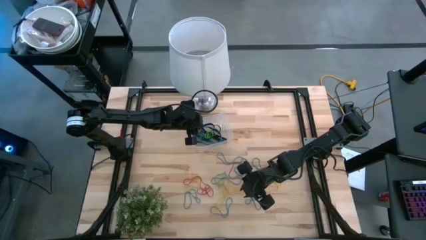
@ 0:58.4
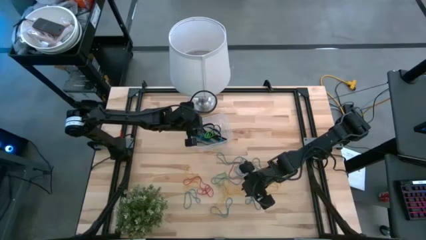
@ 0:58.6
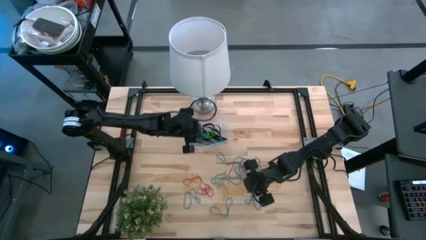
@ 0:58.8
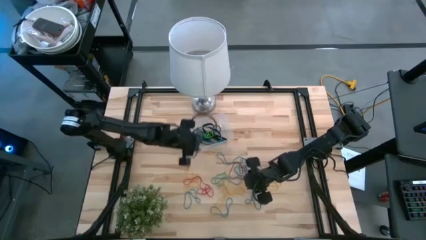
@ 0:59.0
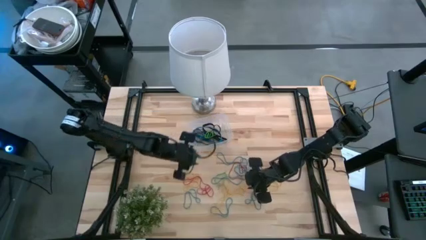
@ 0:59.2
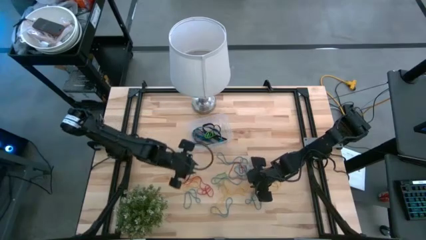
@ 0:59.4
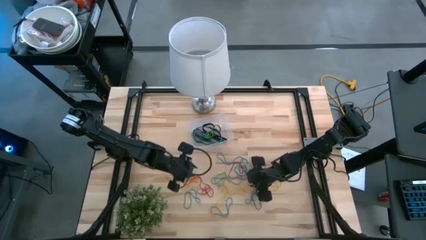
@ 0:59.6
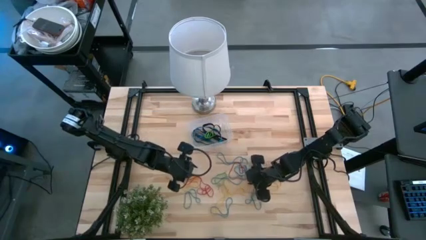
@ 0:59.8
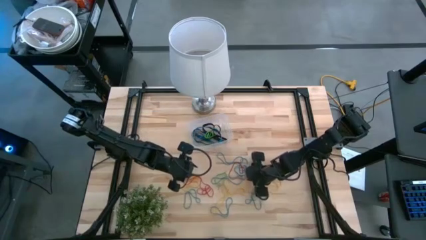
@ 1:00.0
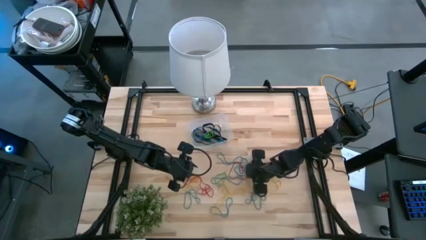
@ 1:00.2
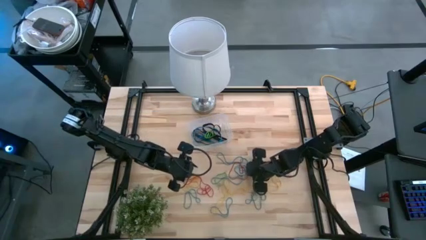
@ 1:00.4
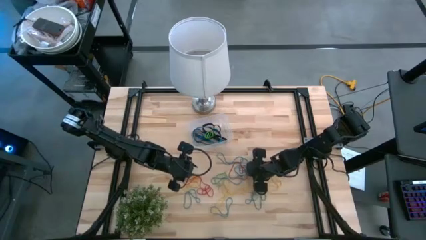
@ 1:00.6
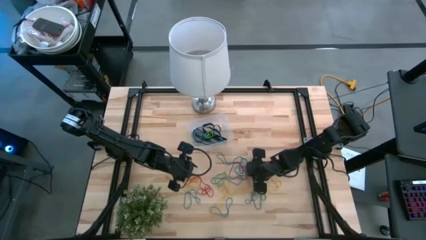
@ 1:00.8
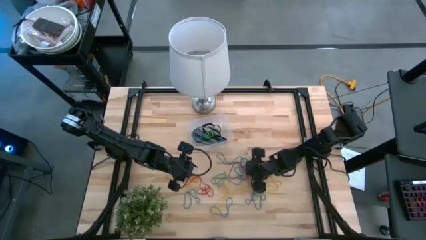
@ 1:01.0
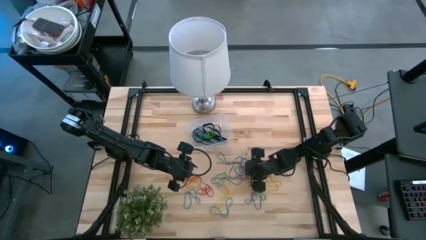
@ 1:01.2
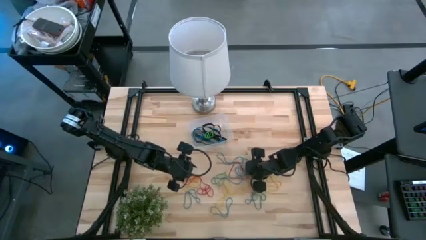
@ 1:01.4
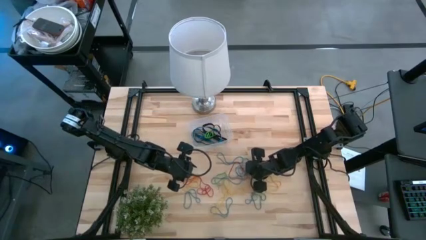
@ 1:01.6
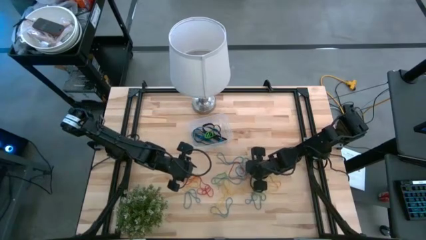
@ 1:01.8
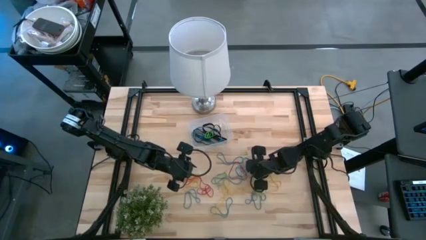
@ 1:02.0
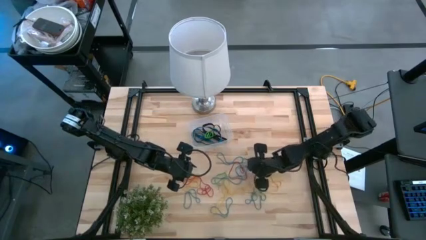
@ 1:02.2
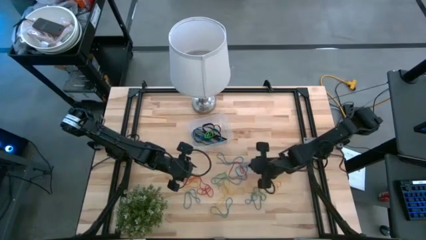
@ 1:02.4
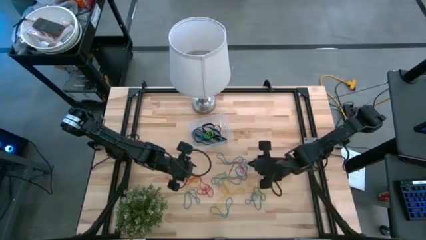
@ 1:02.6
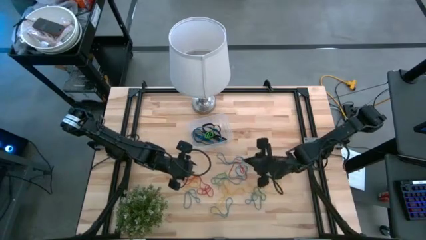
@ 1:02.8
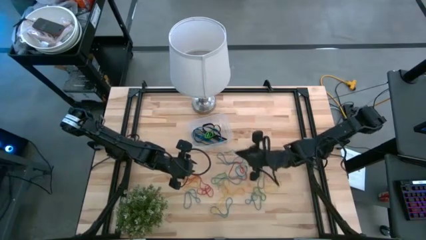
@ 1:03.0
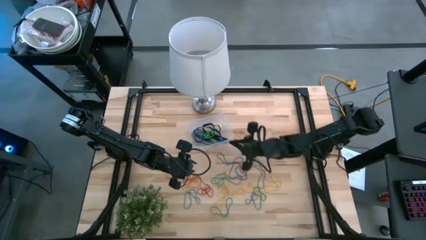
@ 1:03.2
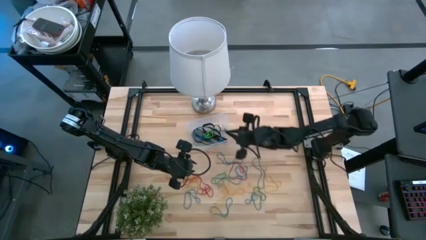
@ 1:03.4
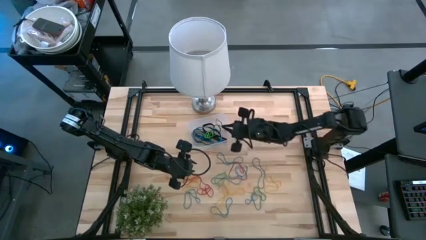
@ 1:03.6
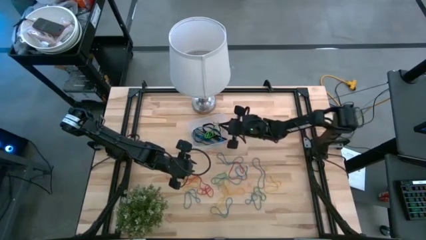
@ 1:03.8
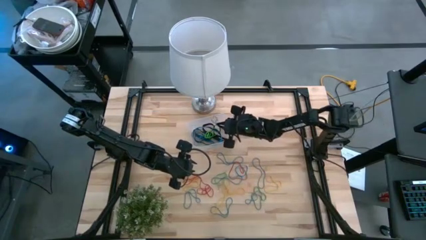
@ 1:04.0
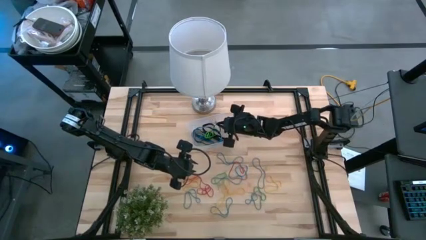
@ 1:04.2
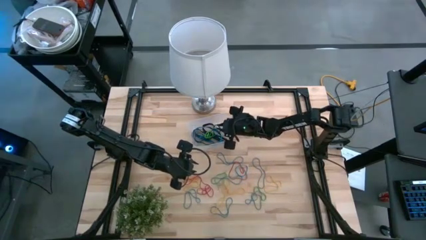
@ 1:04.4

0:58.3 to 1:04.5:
Task: Pick and place rubber bands into bin
Put the blue rubber band into the transparent container

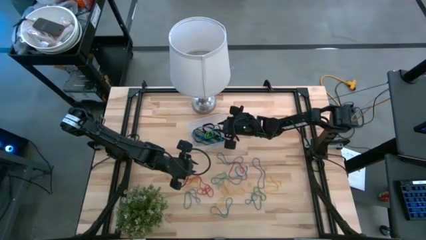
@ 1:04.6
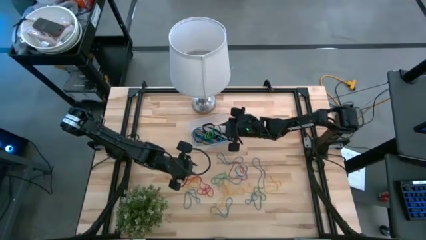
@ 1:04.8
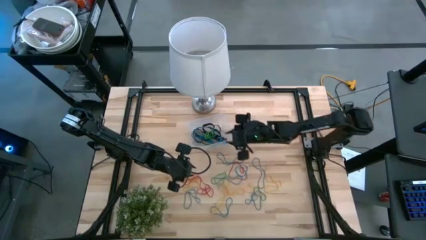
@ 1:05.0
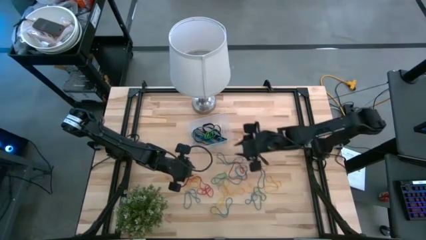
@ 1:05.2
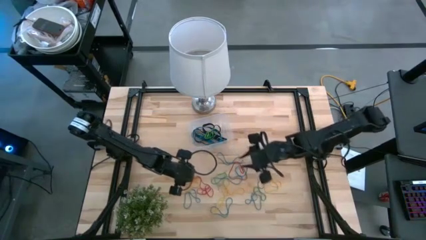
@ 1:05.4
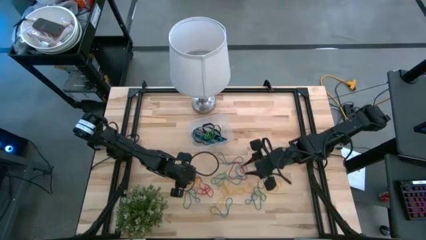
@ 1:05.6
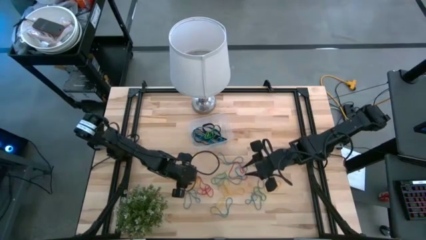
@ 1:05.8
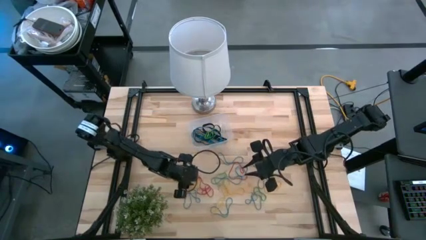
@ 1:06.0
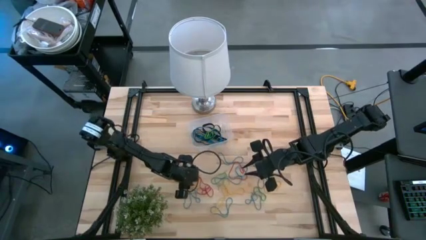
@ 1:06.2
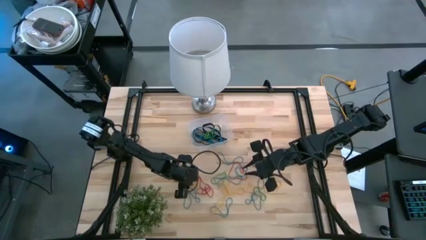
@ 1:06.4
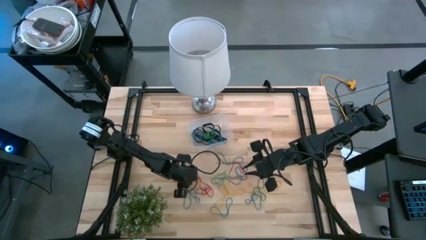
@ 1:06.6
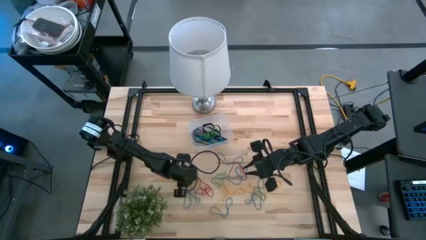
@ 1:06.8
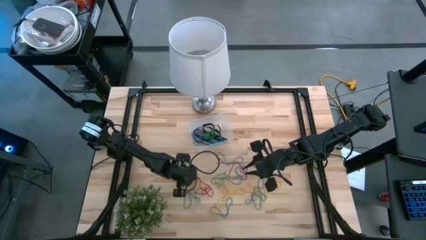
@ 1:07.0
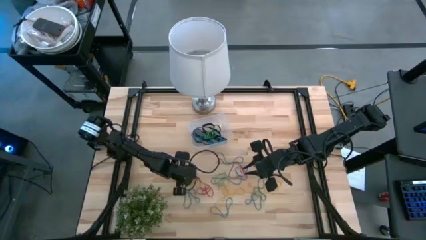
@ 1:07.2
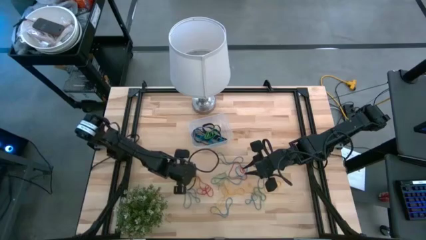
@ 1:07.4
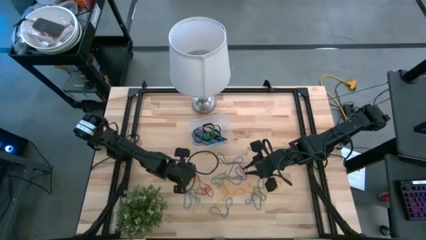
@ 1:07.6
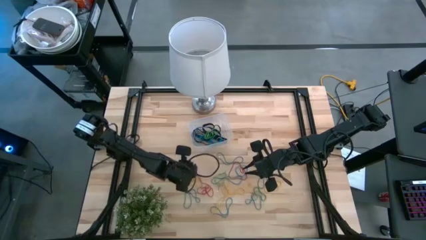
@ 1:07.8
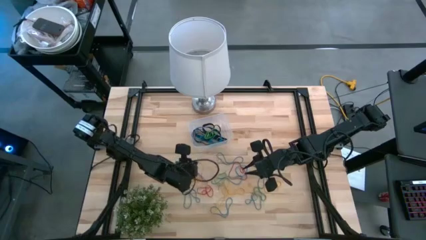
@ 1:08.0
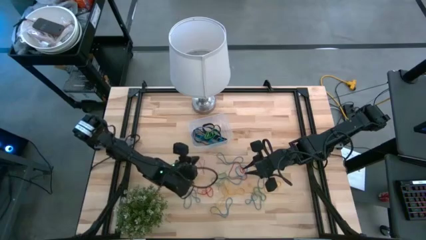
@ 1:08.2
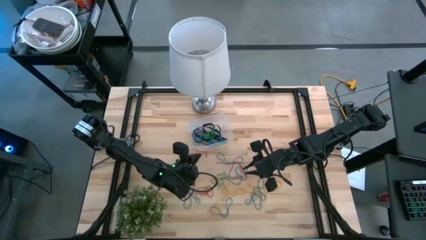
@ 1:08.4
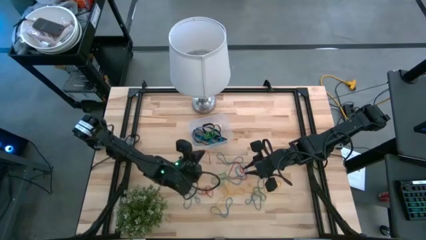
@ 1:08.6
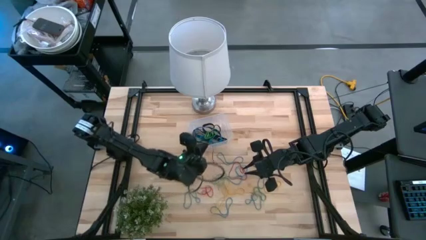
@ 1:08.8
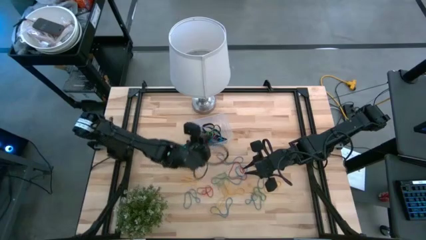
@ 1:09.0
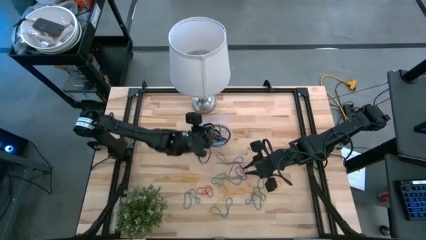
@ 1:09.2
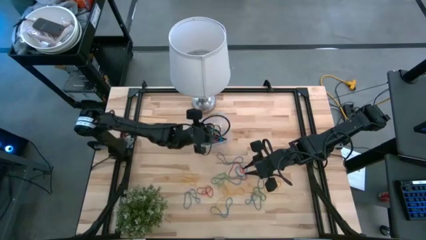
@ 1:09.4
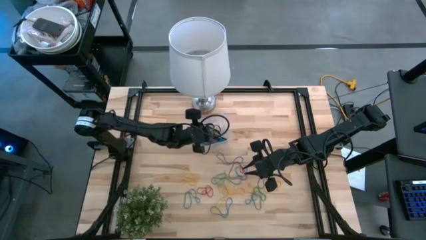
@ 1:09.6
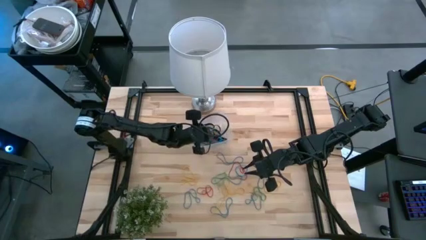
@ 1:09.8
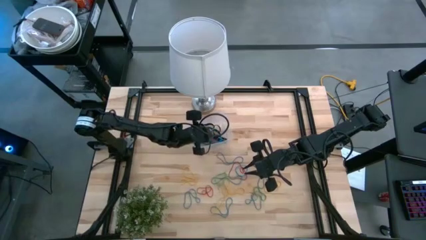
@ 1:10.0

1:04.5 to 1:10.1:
Put the red rubber band into the transparent container

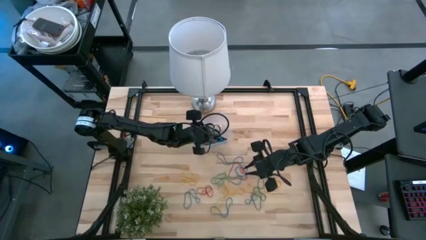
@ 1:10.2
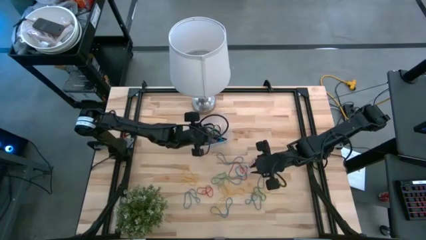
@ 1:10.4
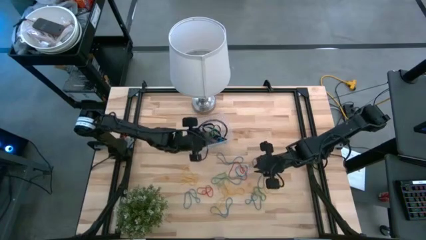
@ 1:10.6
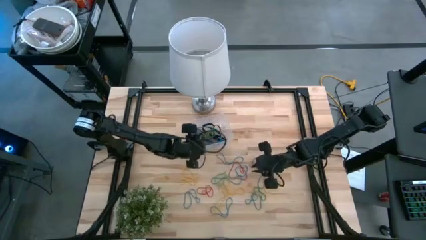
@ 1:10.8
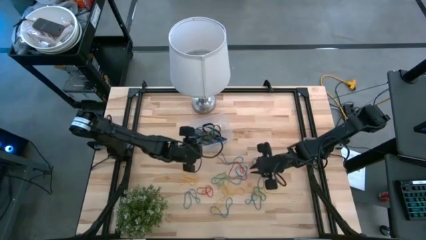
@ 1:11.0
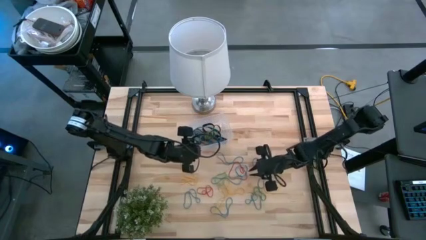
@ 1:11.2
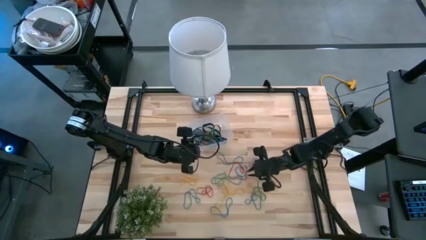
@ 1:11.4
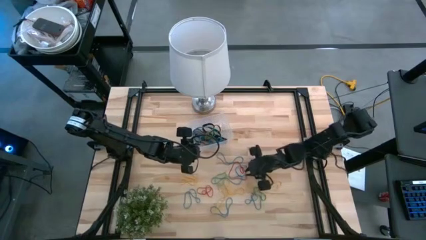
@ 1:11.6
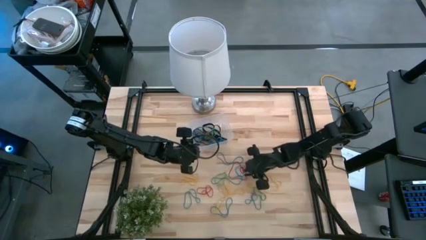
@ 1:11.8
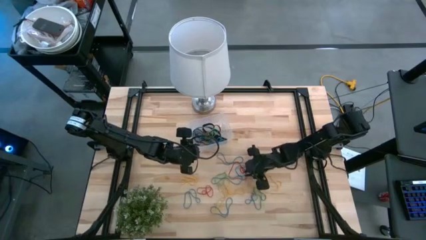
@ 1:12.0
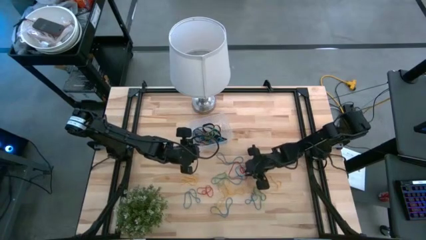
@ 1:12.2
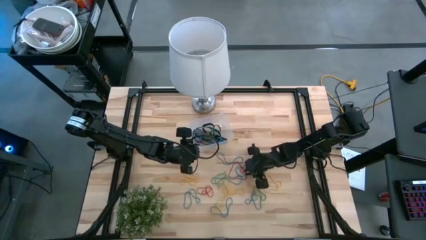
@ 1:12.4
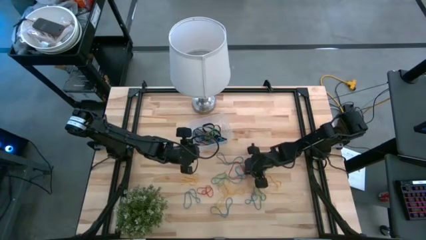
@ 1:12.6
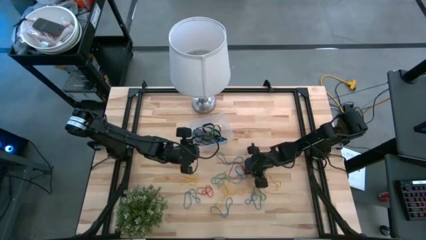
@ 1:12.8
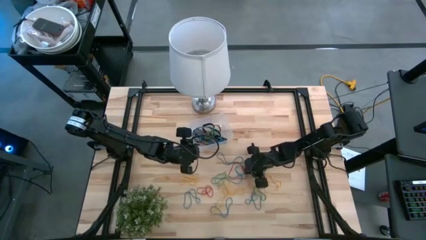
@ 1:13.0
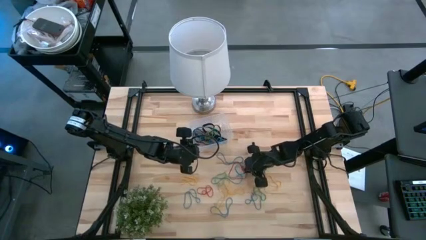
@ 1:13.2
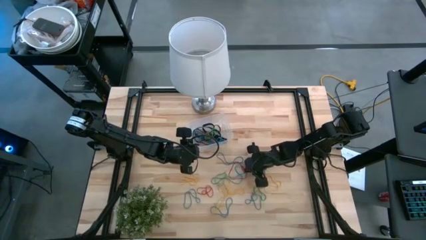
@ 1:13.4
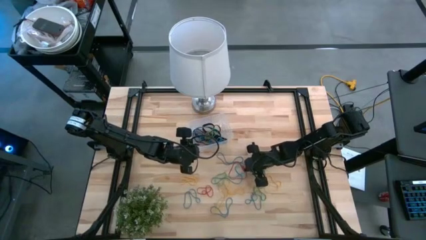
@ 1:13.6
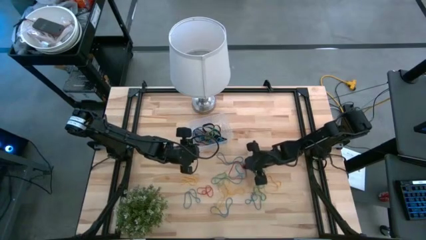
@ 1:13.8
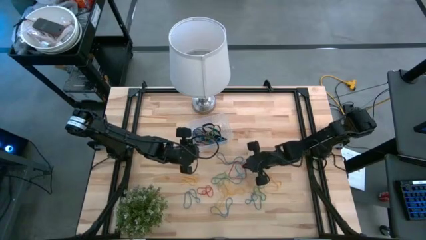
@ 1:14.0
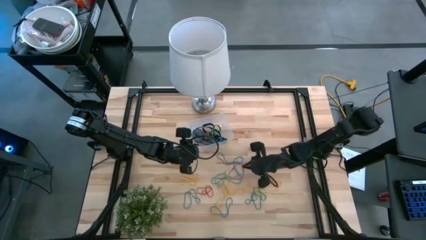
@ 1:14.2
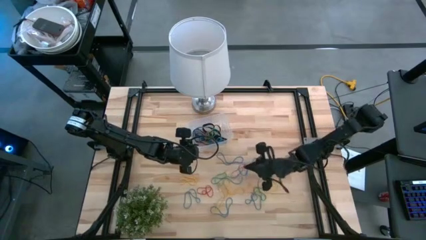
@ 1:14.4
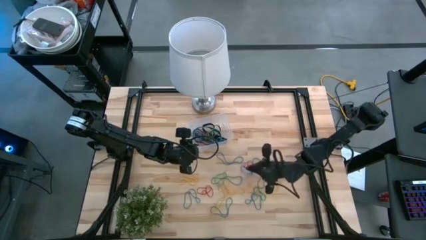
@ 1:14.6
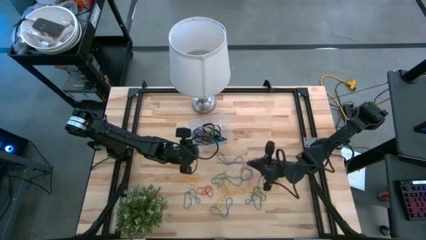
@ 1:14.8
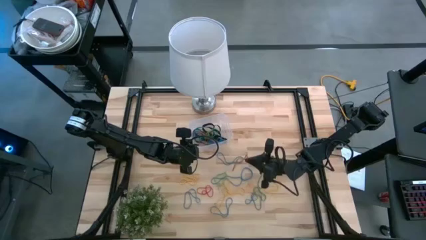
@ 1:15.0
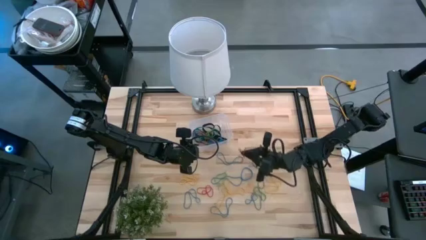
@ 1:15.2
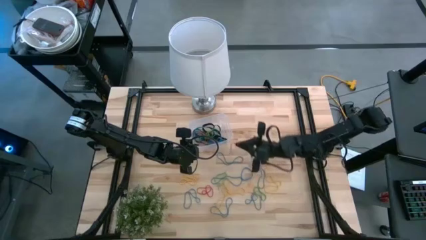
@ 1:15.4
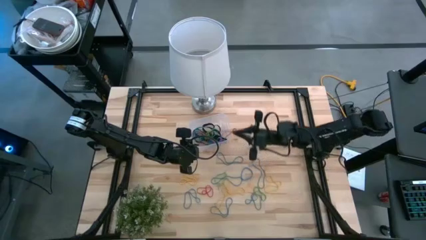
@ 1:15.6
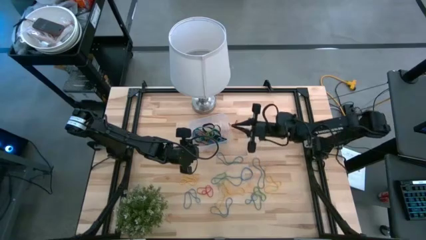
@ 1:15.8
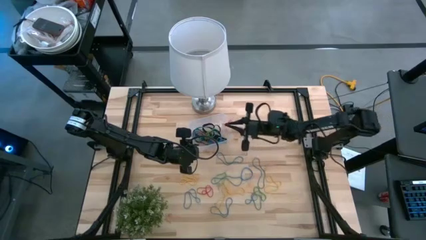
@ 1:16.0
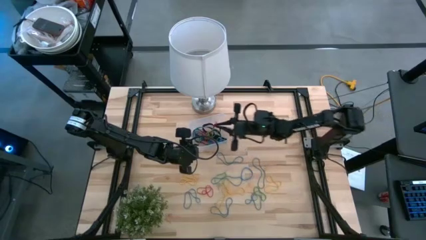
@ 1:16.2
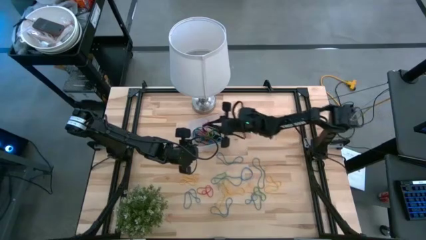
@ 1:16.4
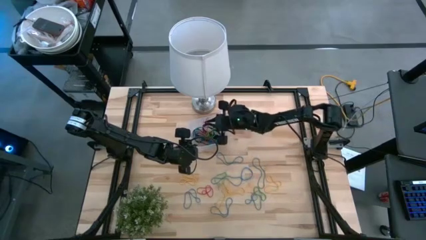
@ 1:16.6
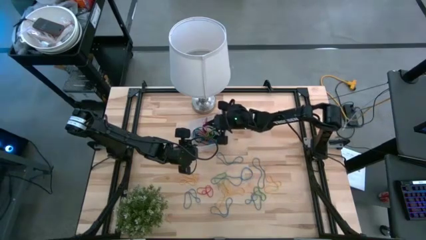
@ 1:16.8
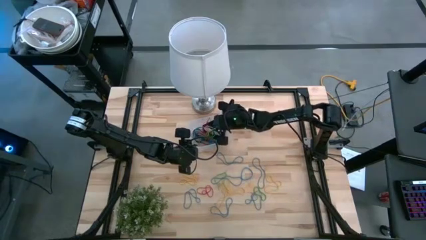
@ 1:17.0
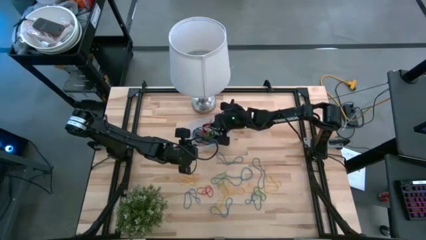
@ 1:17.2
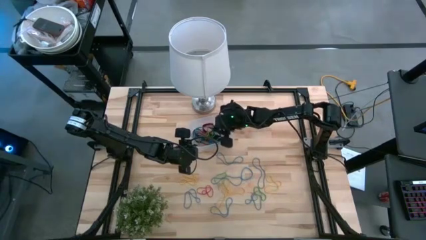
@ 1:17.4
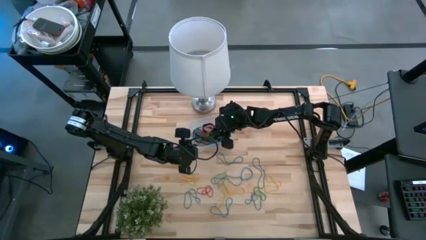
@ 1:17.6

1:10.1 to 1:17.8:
Put the red rubber band into the transparent container
